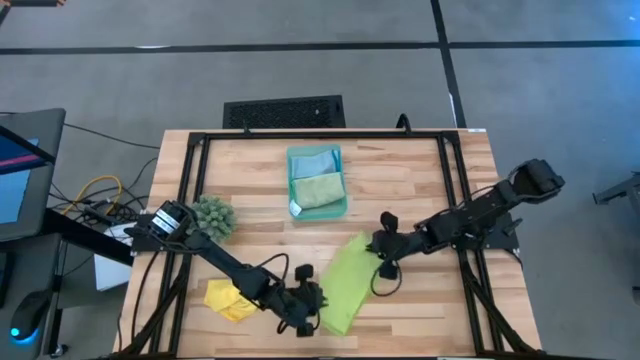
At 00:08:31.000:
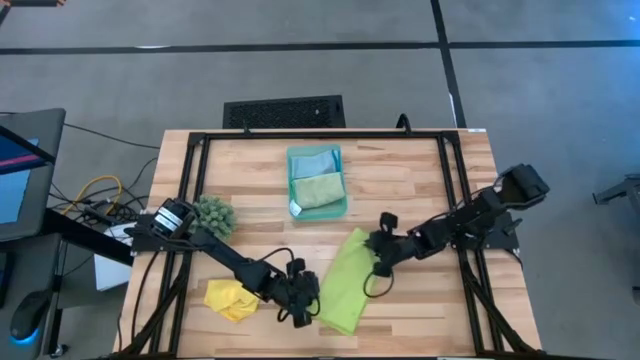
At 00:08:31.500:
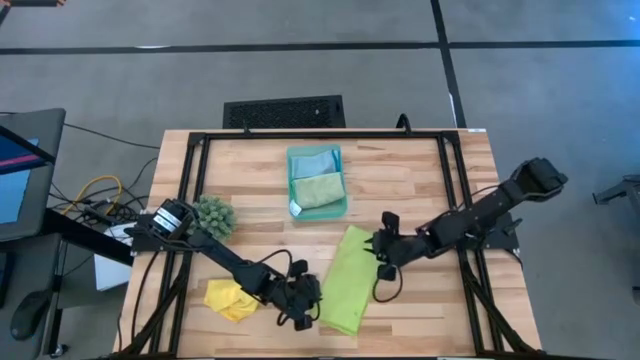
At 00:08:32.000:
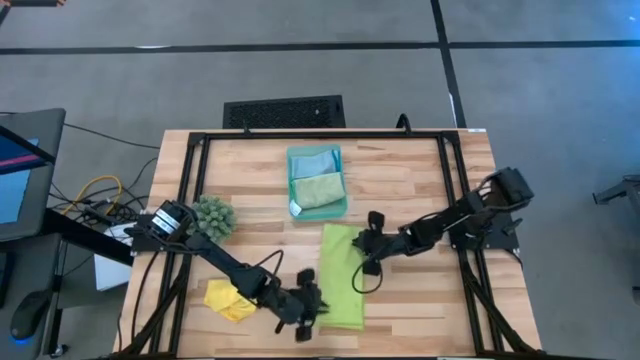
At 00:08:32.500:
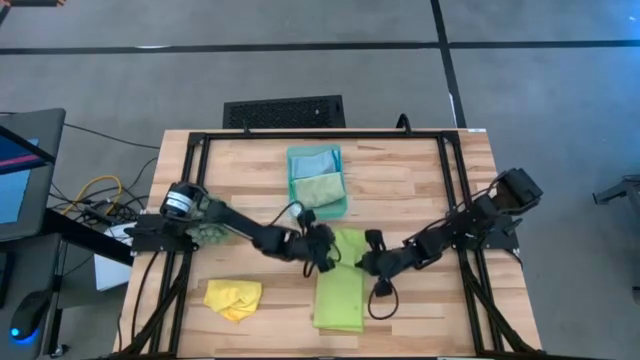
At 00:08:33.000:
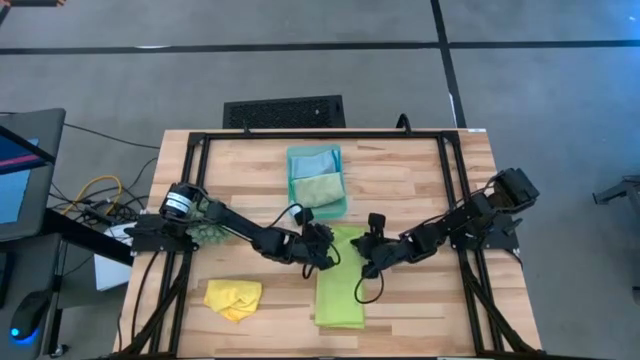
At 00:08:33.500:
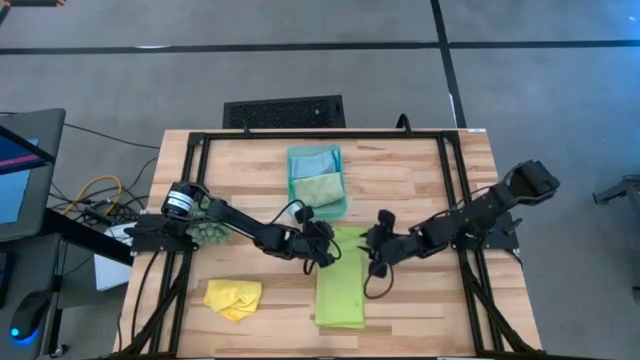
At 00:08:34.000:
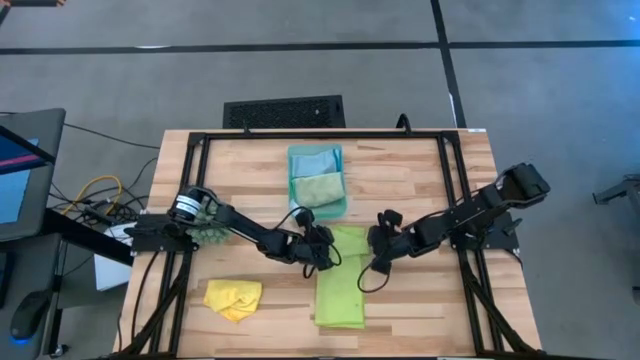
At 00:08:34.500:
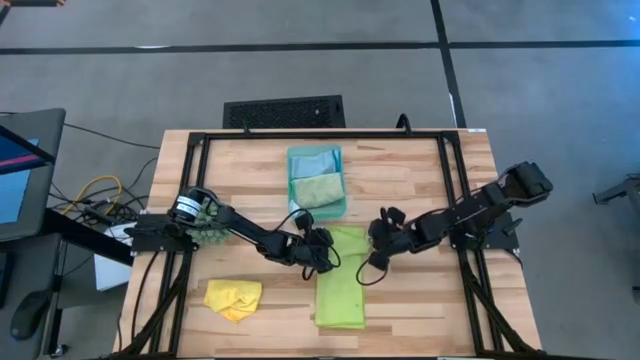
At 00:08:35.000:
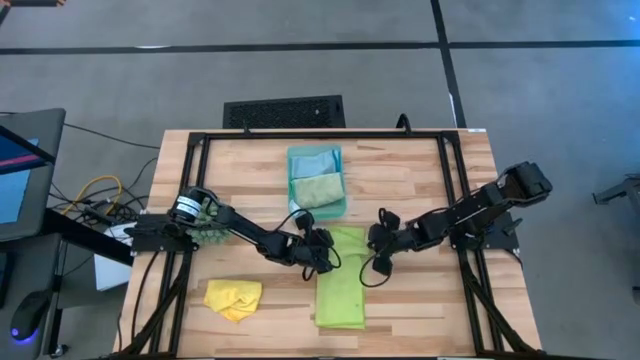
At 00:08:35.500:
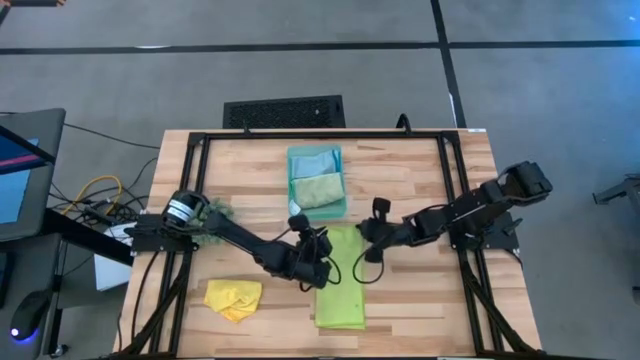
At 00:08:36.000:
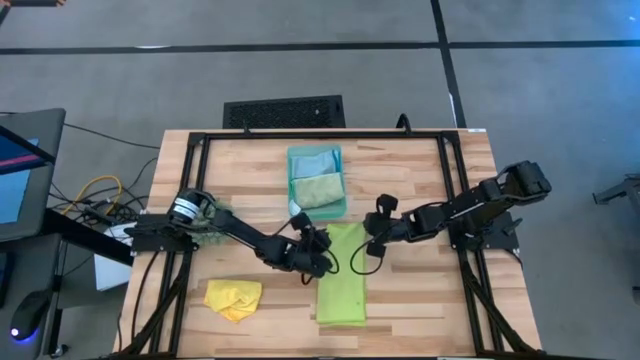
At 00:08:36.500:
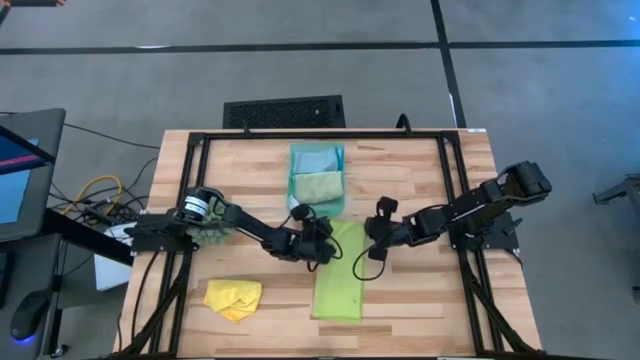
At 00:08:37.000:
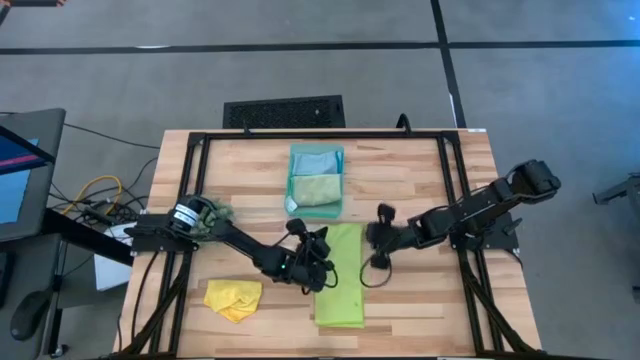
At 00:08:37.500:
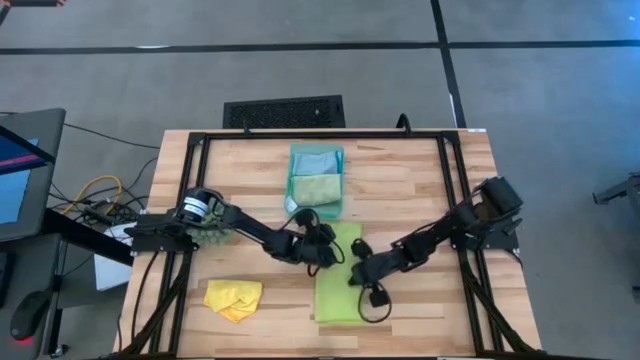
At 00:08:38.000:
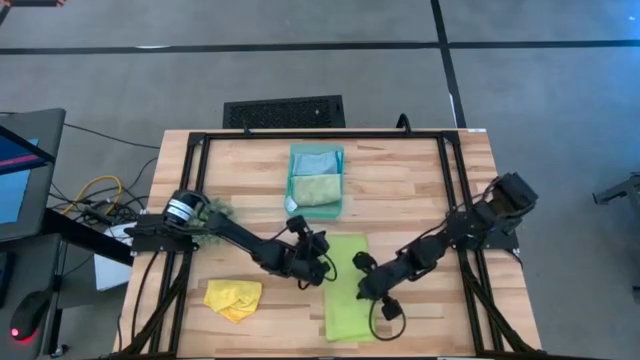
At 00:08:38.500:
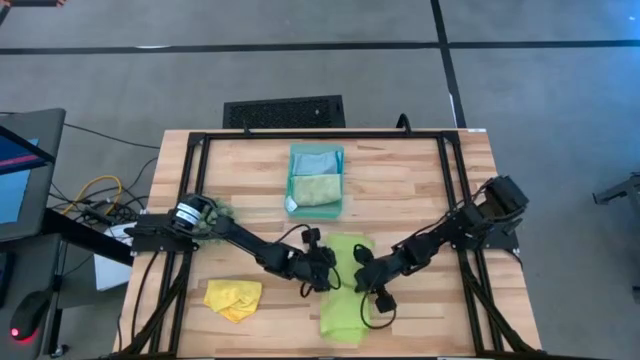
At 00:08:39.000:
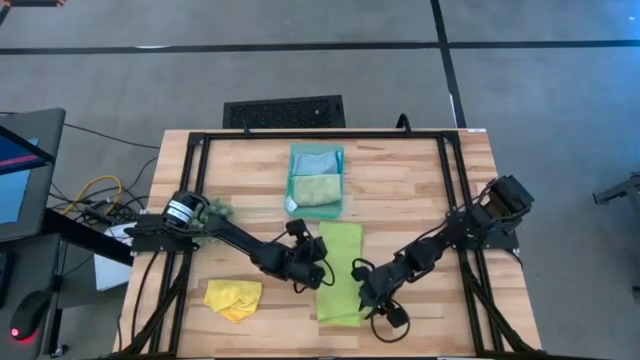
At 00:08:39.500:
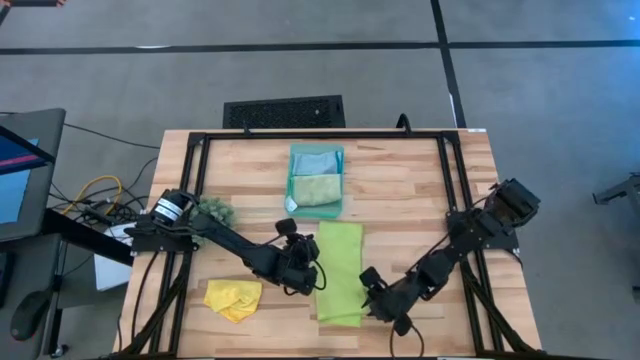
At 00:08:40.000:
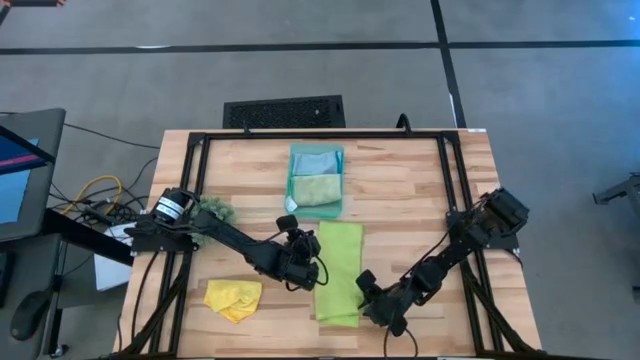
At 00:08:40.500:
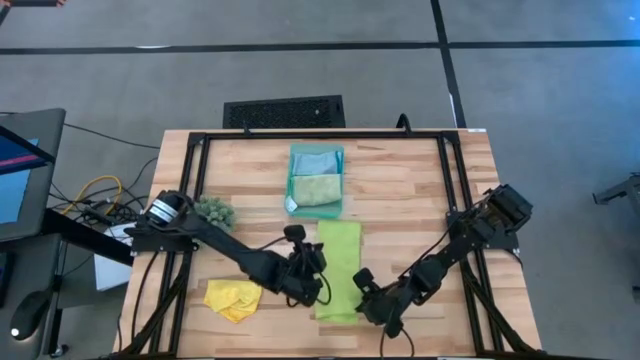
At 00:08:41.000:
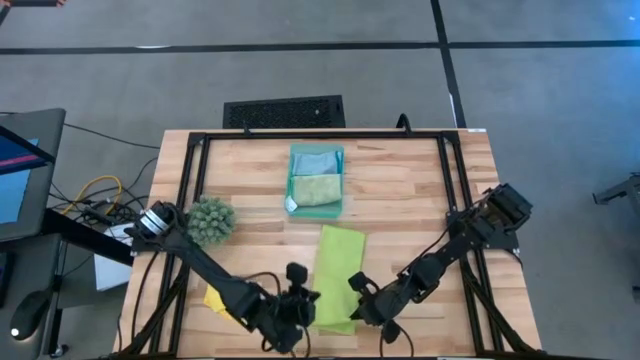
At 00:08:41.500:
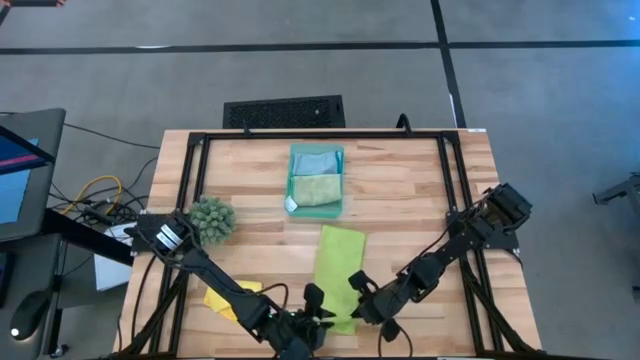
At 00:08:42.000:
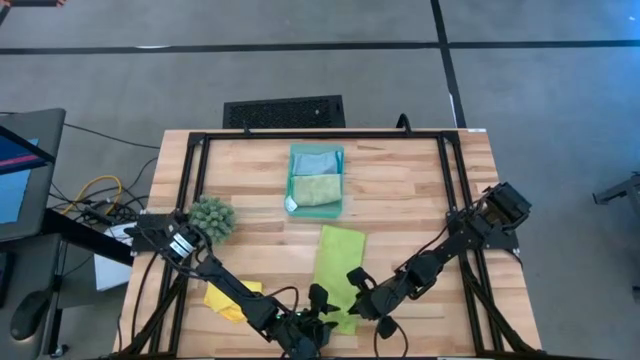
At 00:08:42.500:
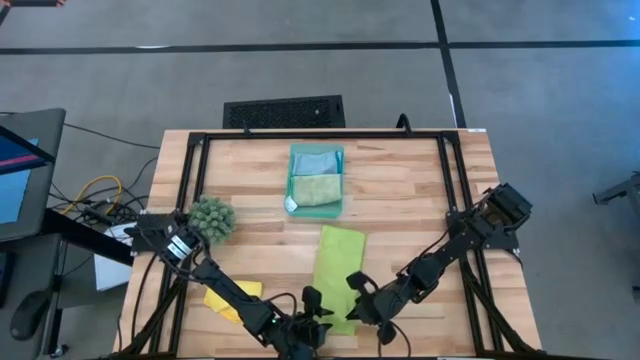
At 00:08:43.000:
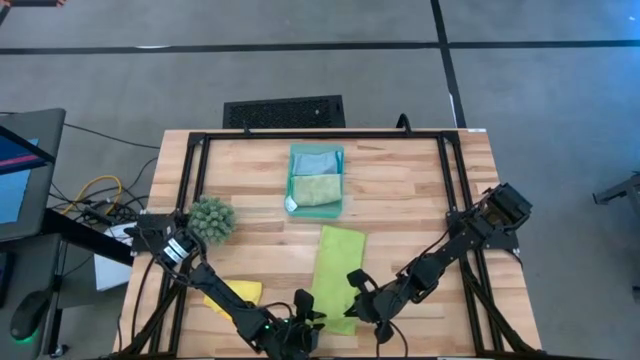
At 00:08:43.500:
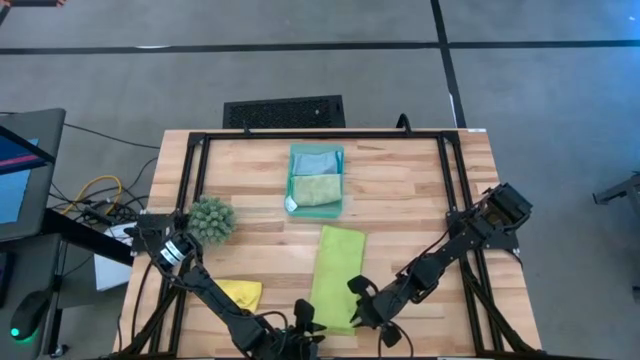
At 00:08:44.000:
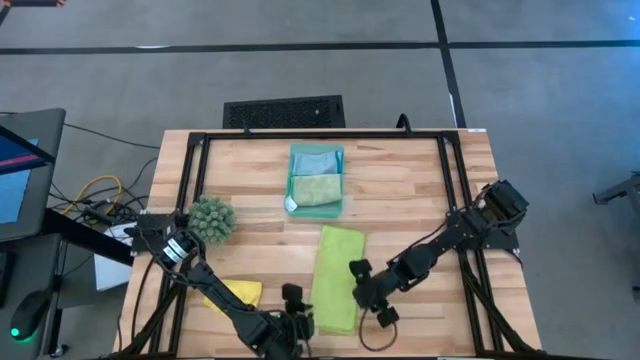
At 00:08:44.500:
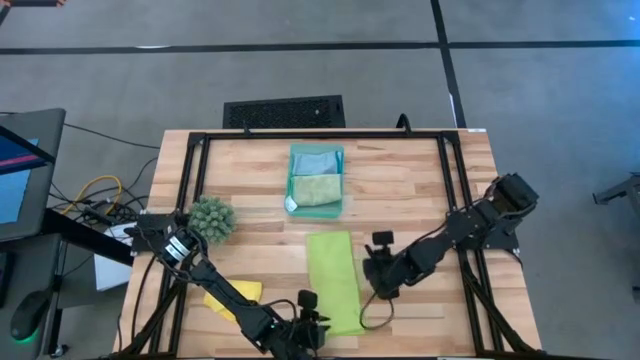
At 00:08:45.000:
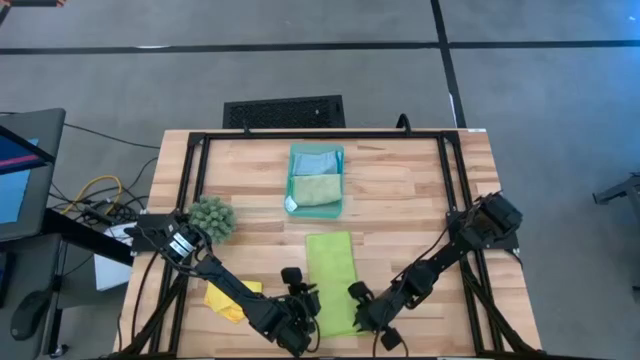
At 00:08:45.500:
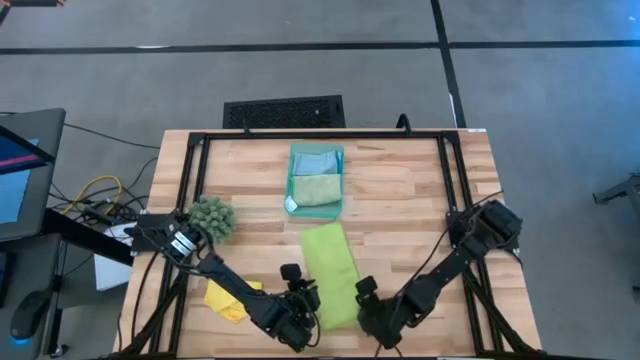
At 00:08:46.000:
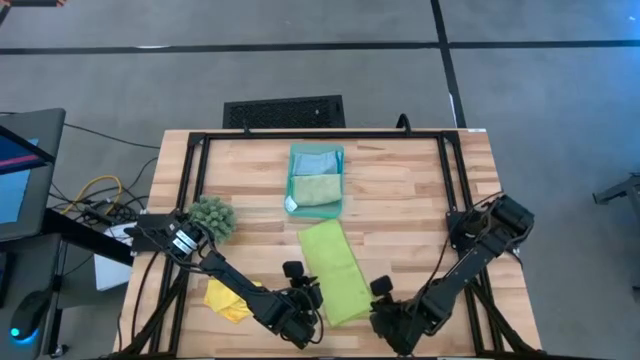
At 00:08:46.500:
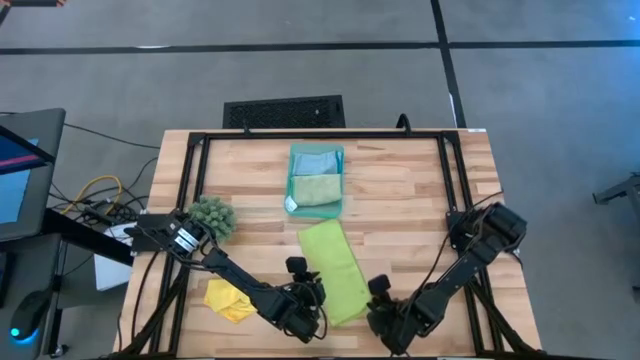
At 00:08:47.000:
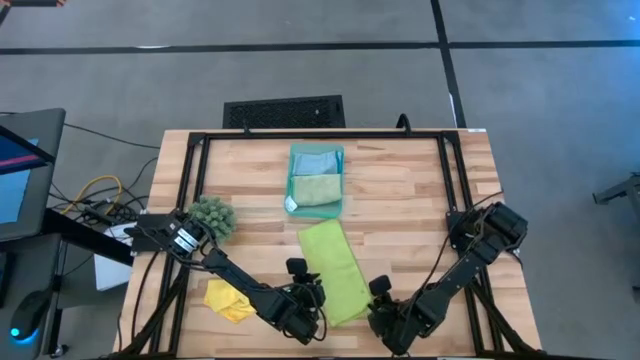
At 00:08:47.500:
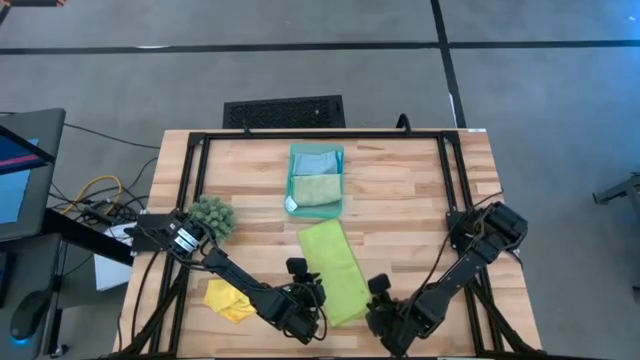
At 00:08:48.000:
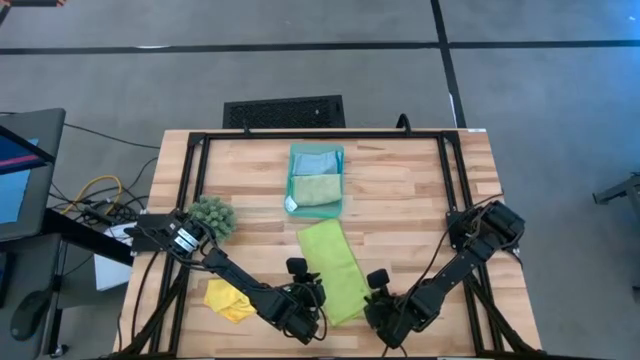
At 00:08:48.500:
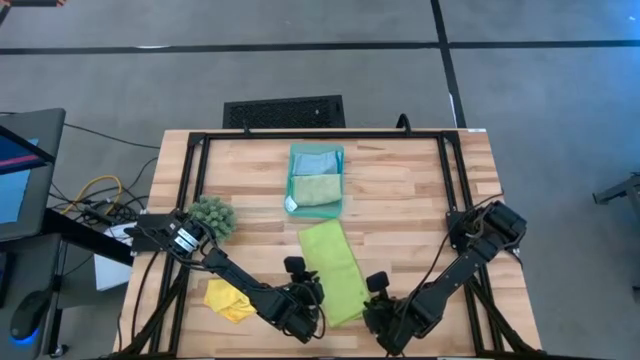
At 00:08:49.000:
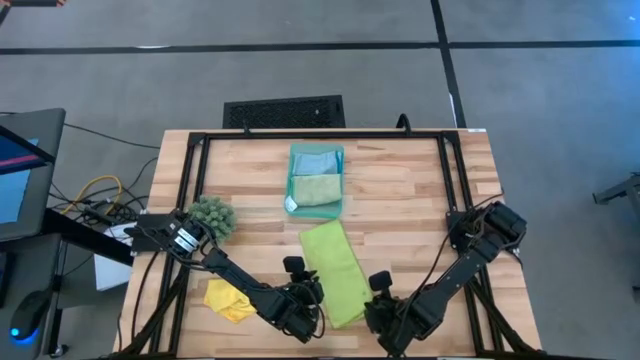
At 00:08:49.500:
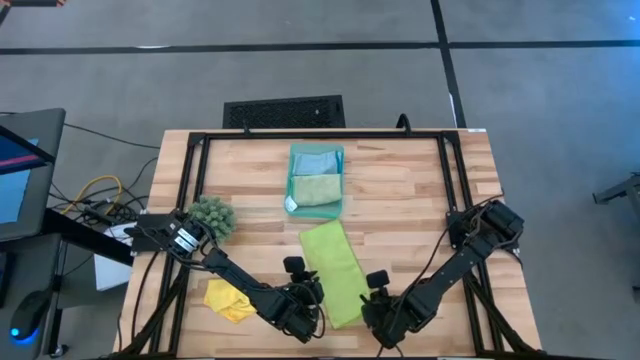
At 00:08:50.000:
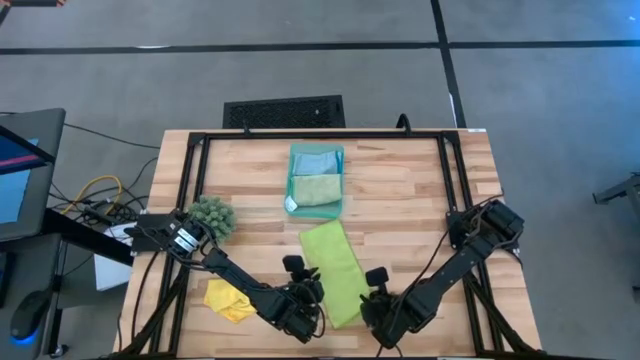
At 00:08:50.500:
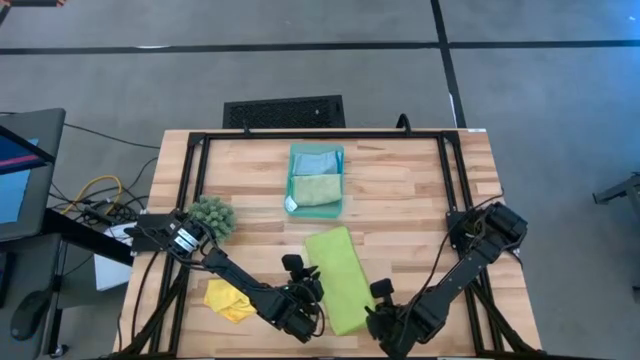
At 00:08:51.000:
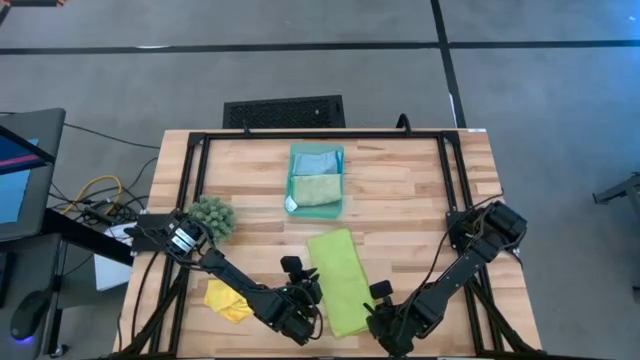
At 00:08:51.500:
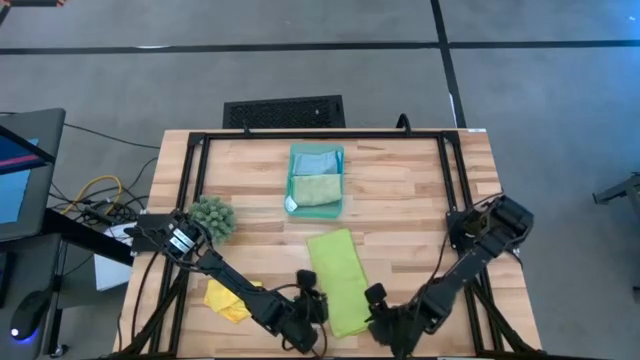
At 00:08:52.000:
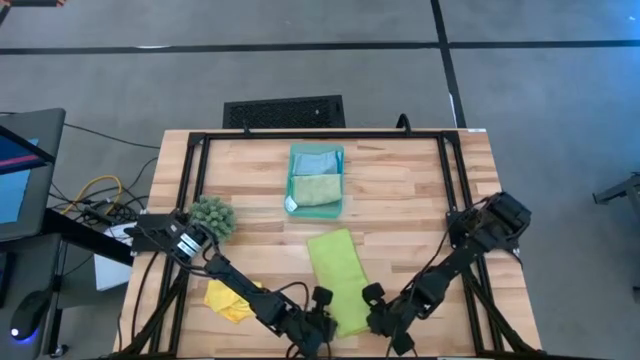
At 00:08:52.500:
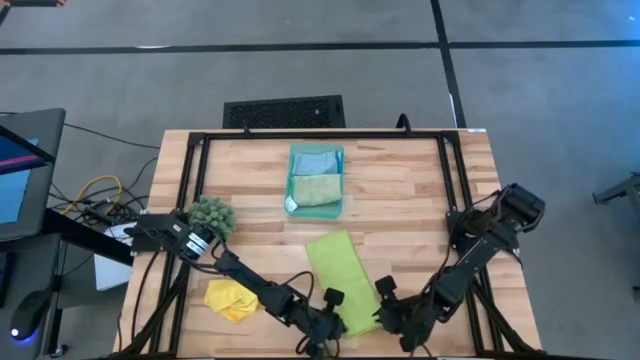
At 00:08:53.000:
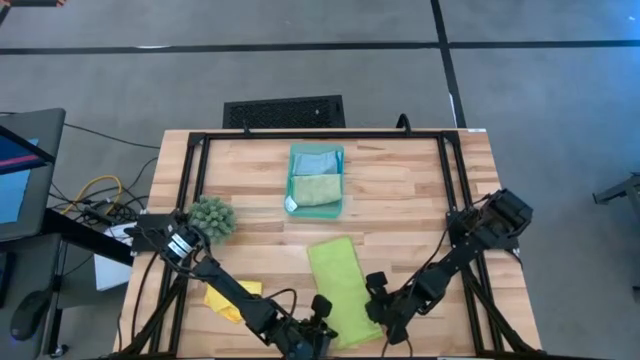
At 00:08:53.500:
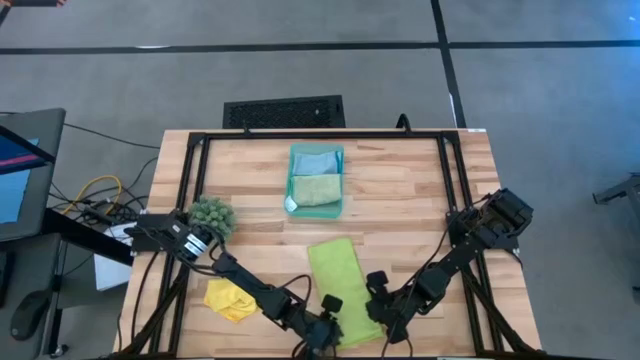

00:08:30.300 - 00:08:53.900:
Task: Fold microfiber towels
Fold the light green microfiber cloth
